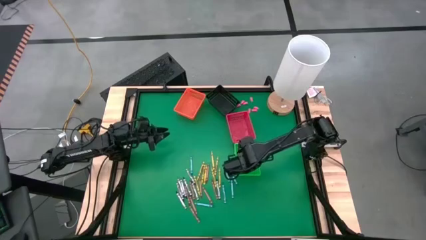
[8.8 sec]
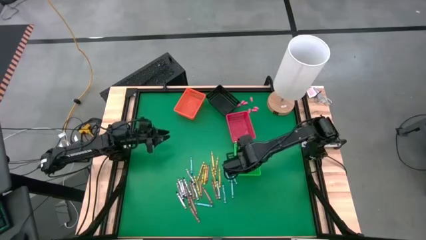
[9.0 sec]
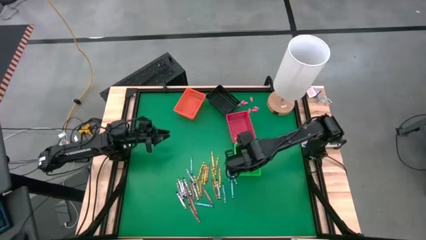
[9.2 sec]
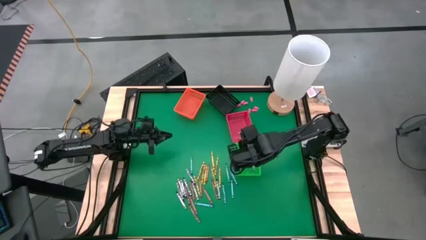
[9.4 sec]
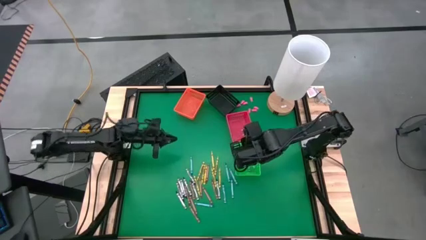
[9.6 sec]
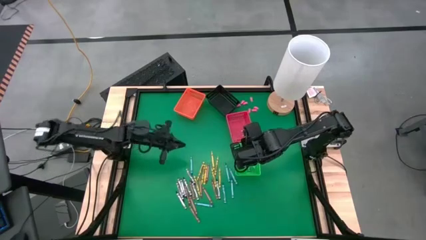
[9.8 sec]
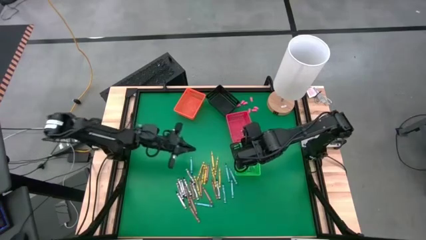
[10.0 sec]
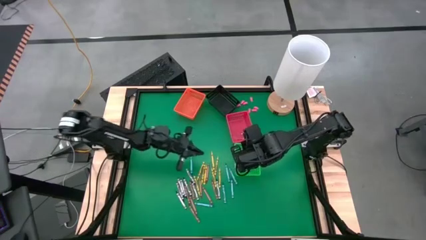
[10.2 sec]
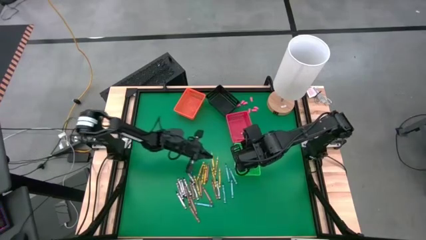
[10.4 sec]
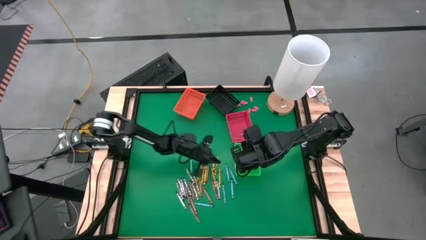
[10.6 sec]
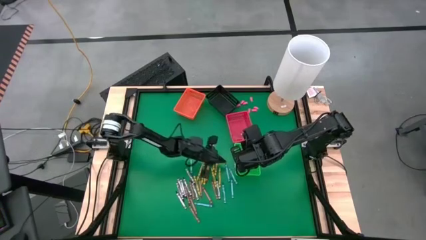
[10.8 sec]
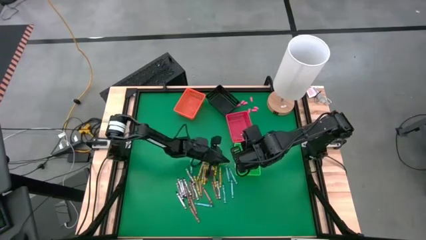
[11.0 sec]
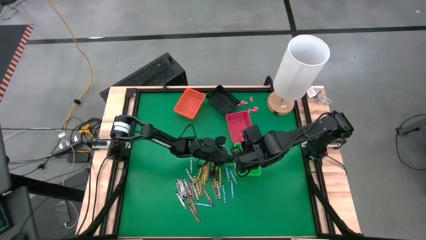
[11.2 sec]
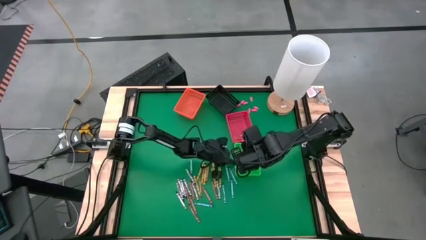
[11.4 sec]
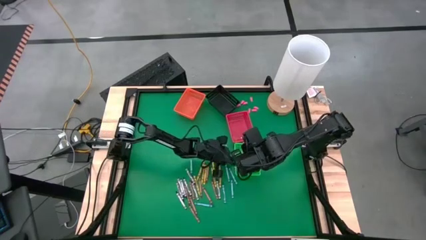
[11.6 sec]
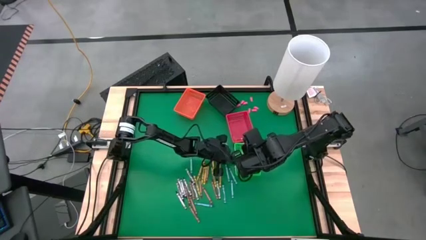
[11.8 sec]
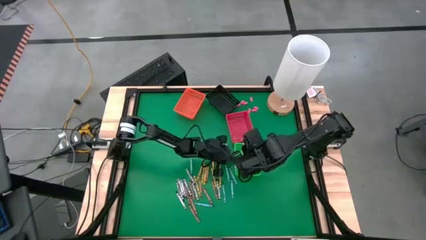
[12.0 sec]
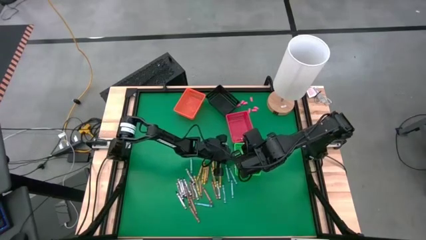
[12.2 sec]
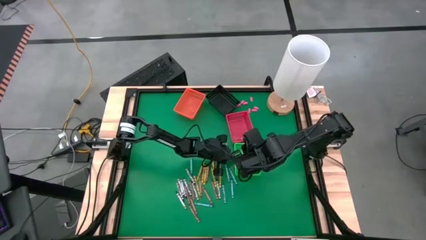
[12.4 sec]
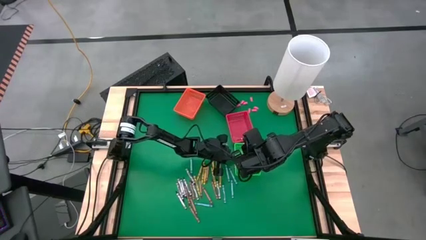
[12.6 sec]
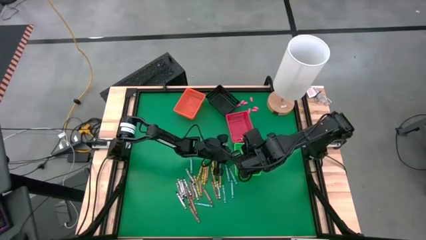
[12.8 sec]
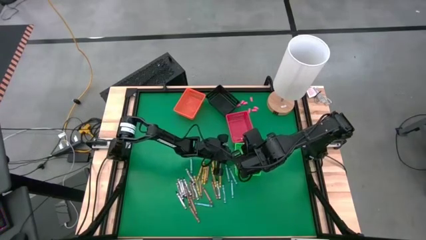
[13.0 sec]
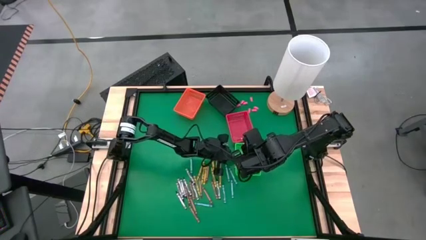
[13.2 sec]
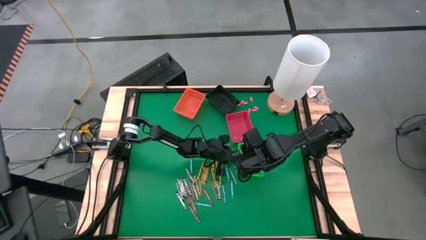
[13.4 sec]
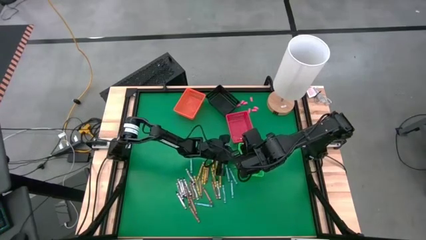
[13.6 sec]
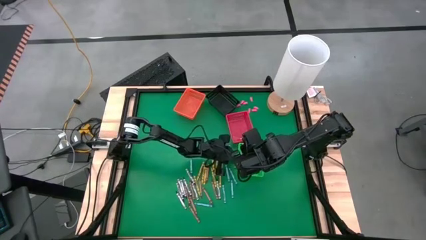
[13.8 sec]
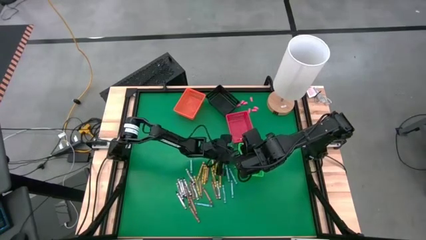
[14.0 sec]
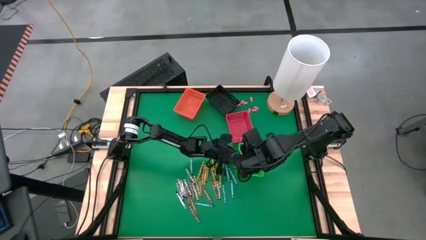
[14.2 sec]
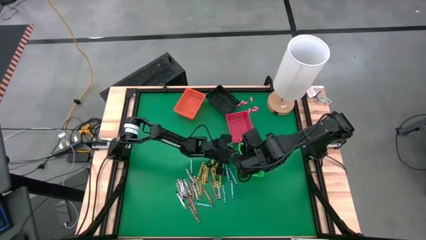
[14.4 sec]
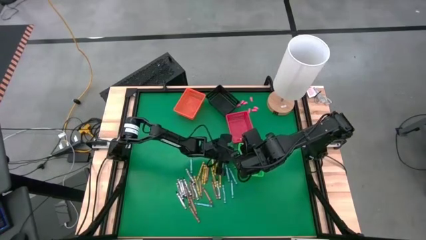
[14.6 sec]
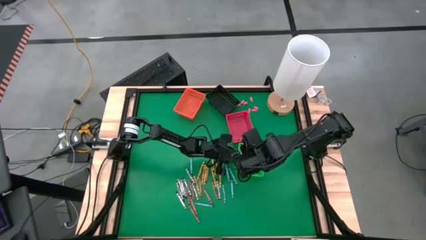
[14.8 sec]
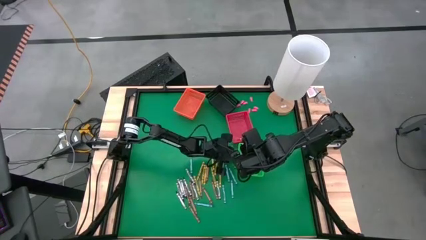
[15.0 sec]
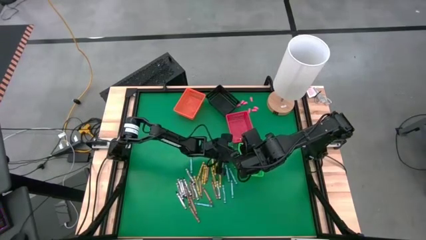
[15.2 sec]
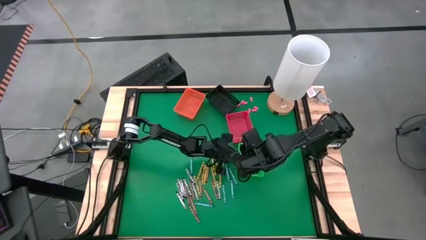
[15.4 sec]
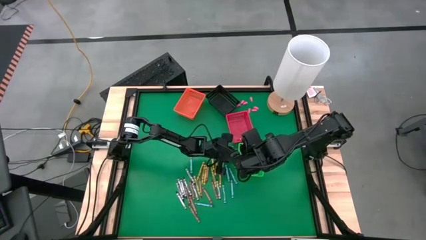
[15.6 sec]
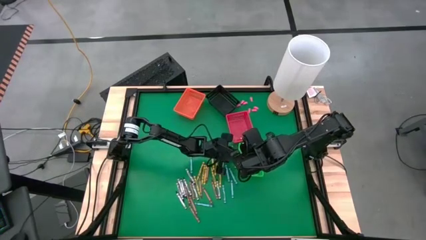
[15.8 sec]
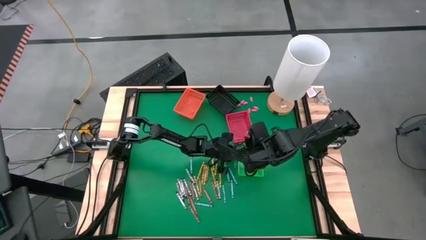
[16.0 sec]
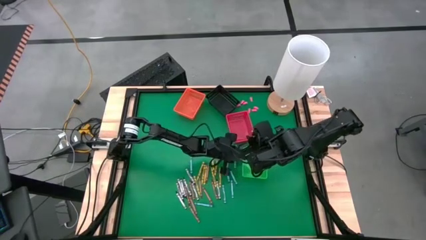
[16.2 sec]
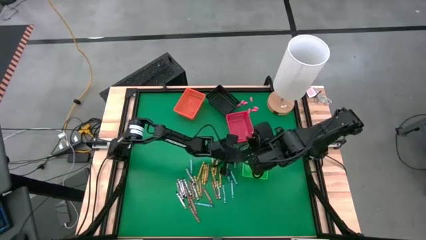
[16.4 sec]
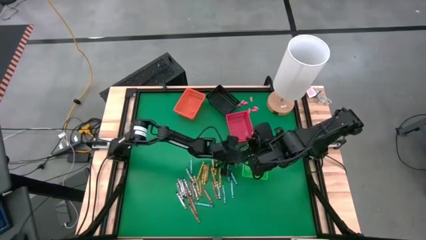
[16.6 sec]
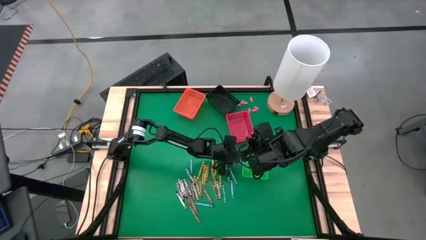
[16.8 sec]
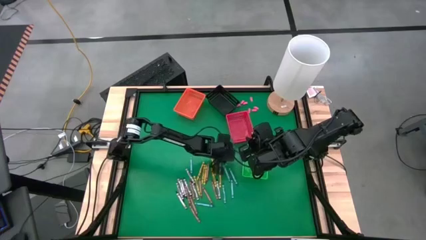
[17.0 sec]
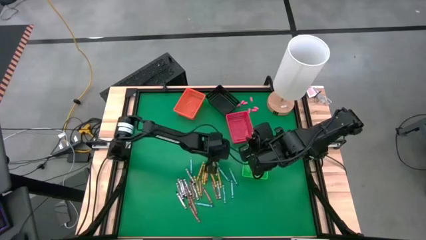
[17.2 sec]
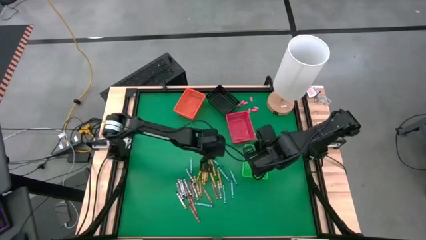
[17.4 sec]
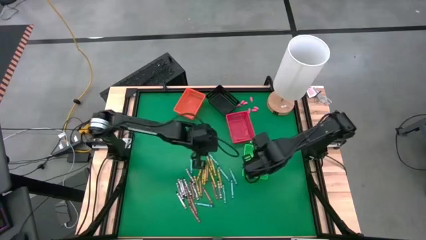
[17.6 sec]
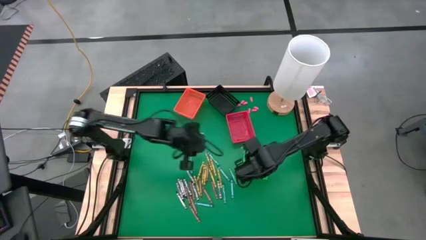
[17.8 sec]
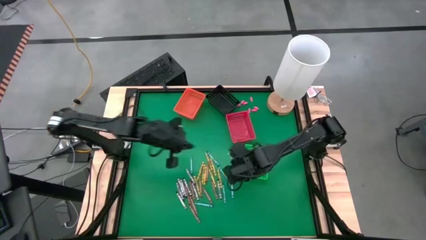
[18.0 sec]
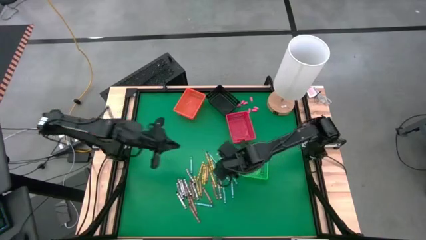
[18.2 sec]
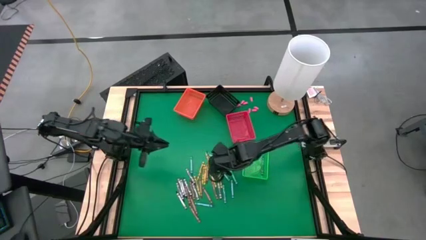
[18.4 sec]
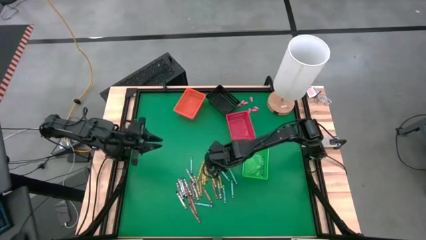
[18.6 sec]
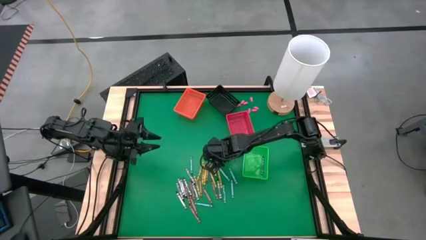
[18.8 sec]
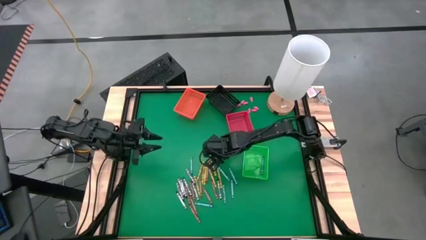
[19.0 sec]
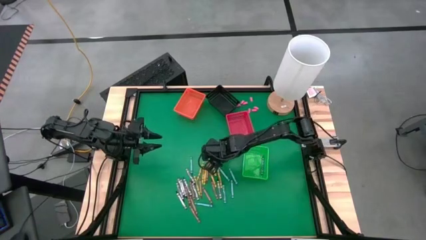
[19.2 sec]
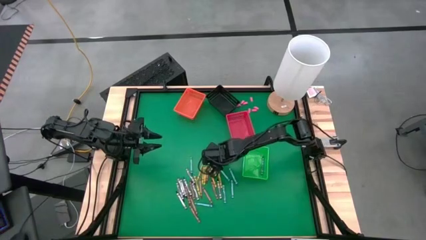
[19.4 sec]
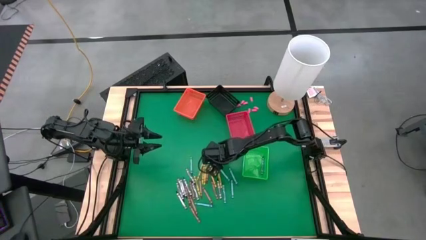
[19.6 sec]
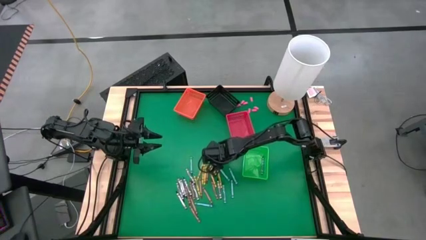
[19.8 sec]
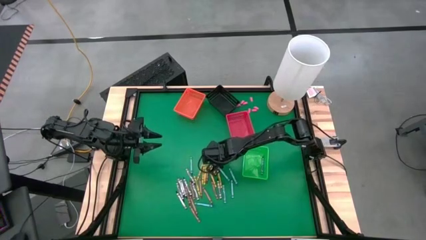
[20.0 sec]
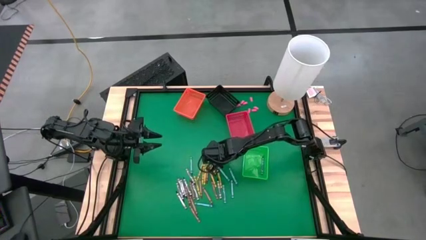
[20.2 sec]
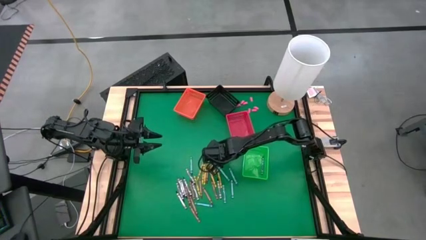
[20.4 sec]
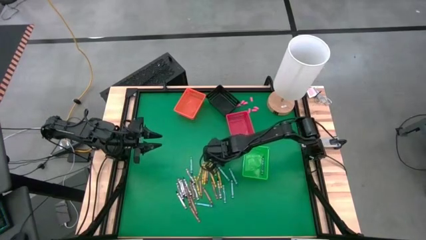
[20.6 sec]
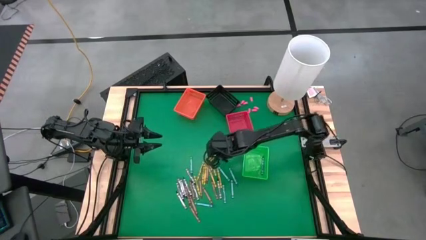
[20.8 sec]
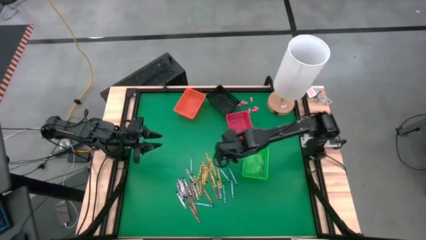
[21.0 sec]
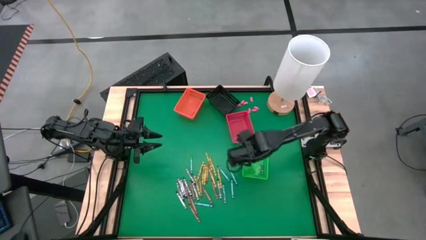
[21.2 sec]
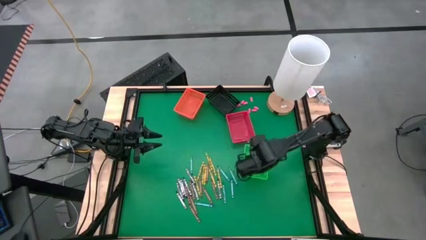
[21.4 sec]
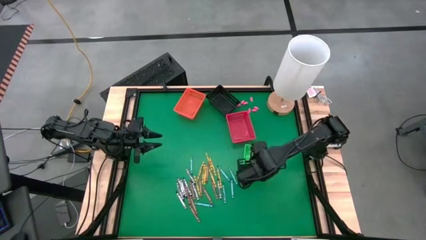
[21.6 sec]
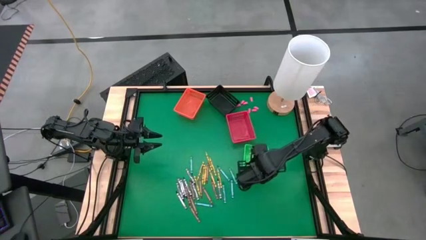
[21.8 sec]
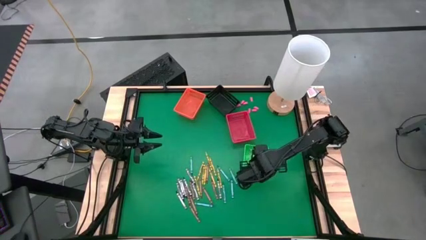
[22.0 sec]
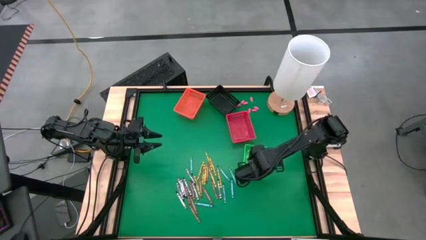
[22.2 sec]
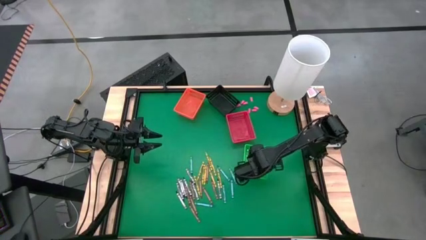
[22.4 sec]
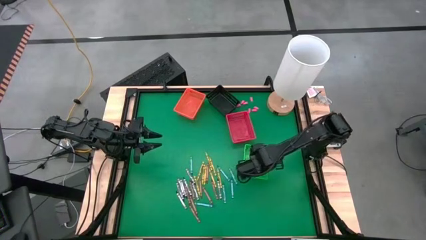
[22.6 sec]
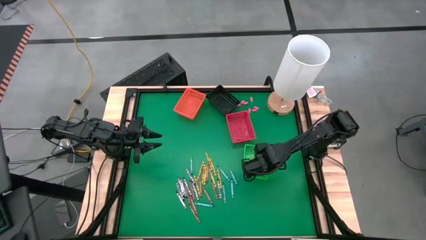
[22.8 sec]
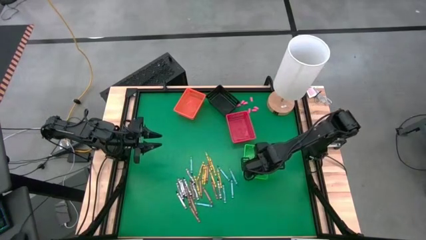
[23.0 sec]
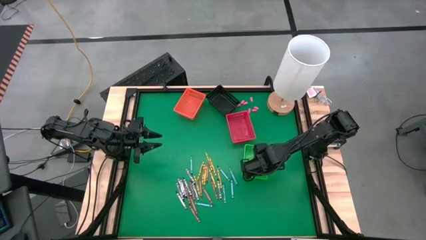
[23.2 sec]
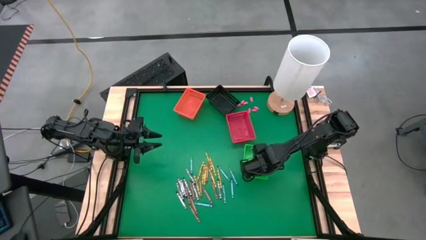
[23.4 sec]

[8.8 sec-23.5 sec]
Task: Sort crayons
Put the light blue crayon into the green bin
